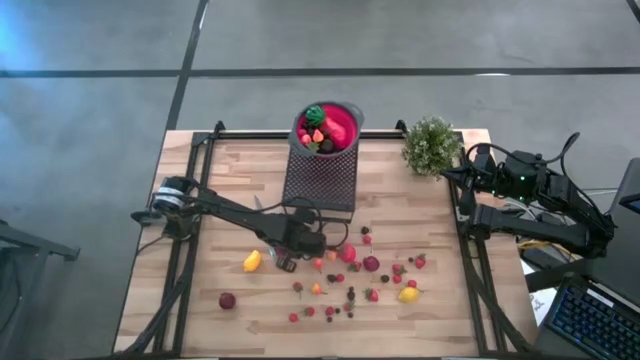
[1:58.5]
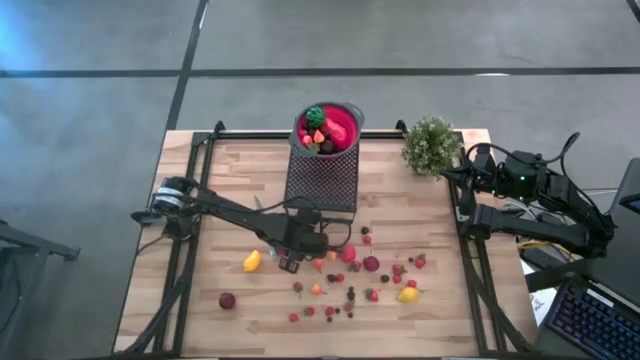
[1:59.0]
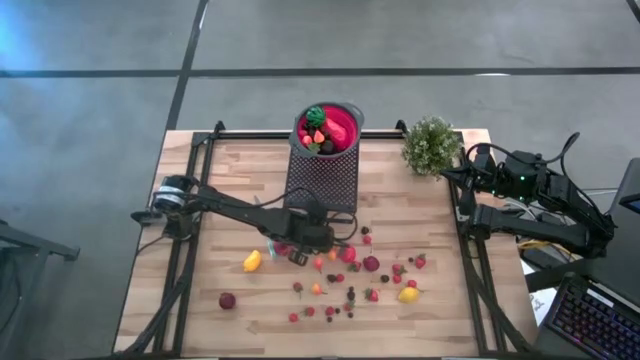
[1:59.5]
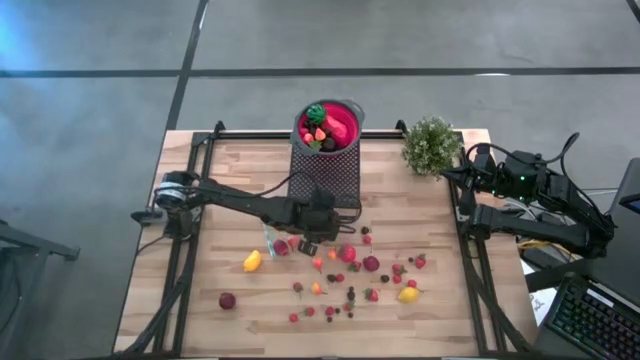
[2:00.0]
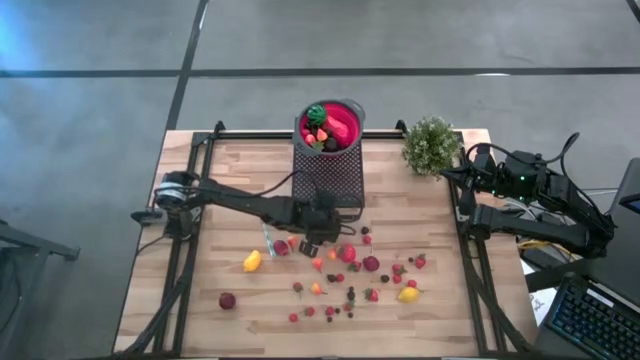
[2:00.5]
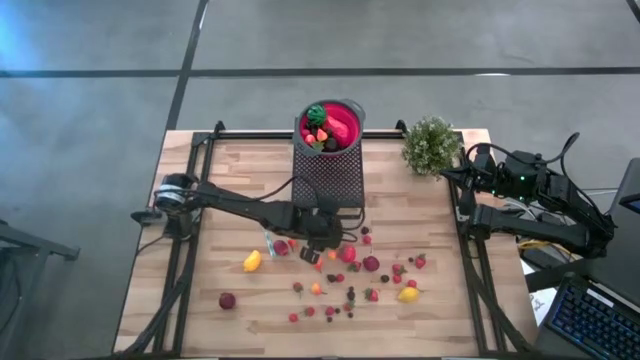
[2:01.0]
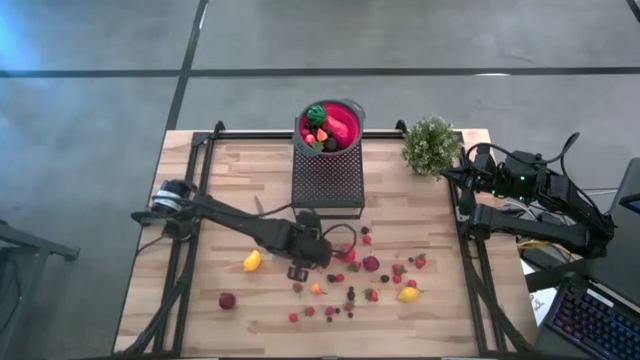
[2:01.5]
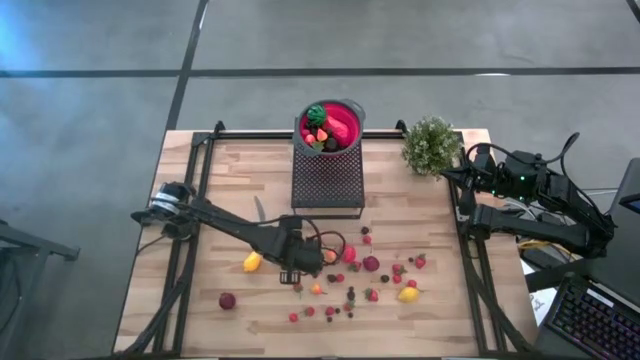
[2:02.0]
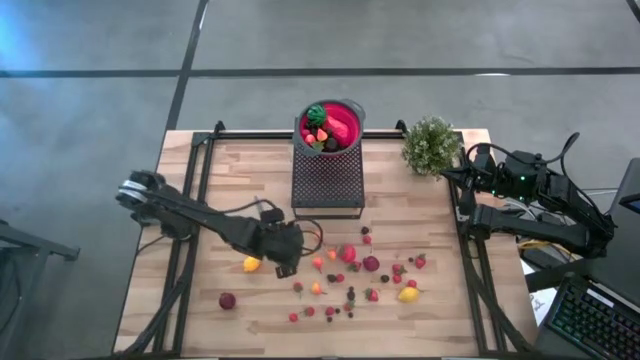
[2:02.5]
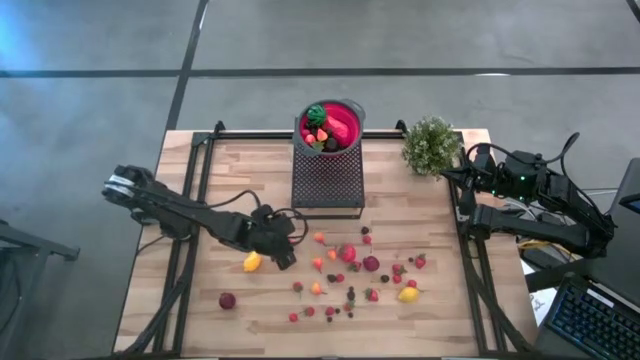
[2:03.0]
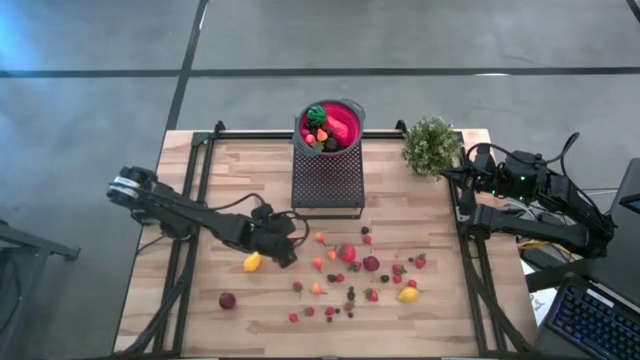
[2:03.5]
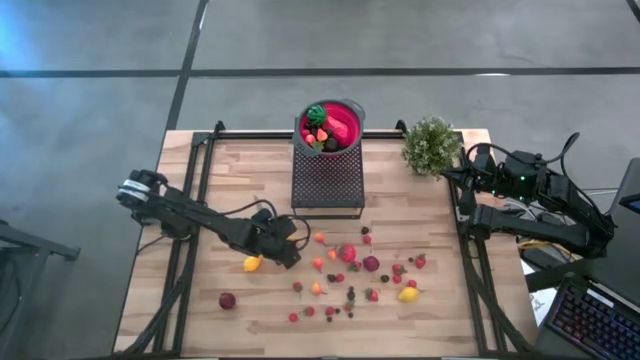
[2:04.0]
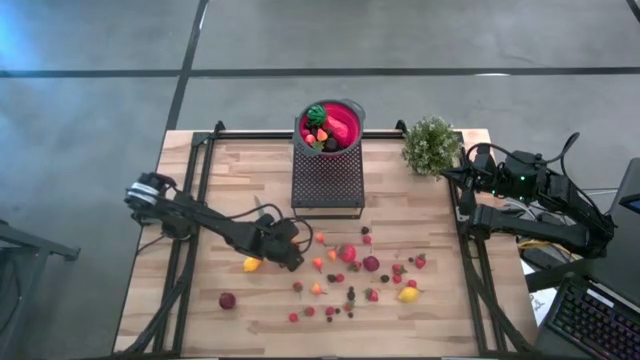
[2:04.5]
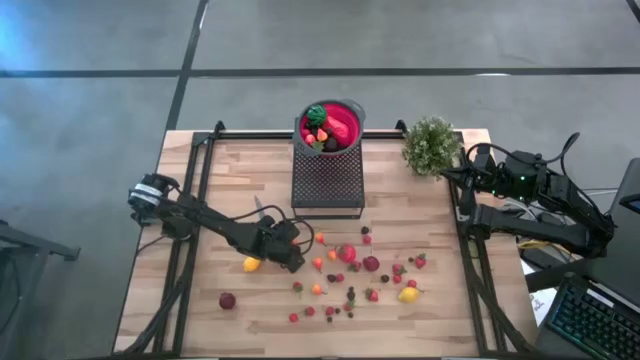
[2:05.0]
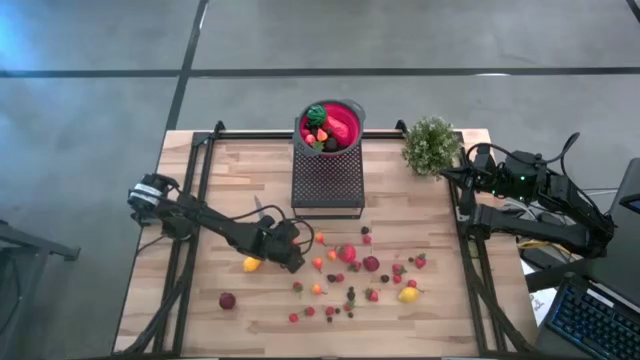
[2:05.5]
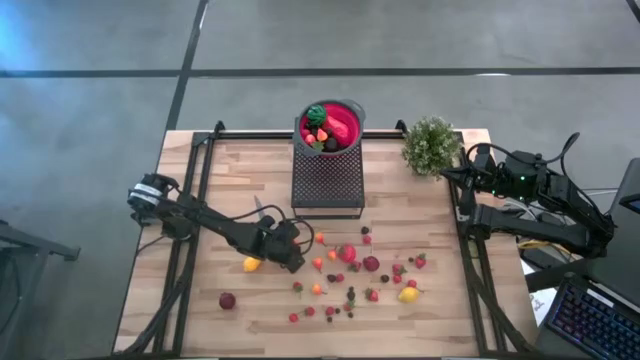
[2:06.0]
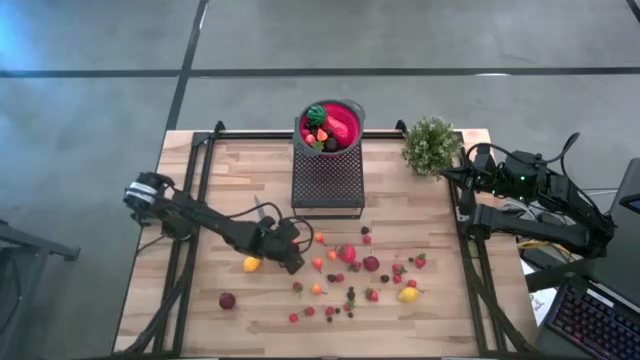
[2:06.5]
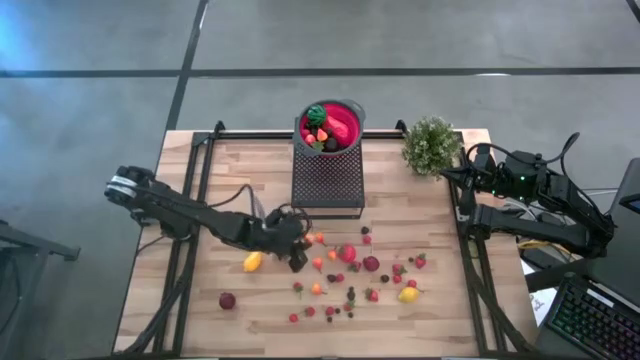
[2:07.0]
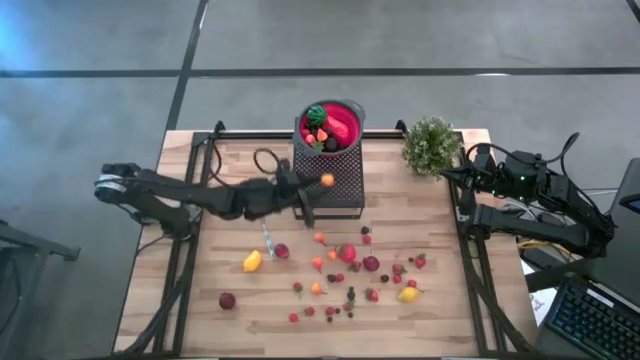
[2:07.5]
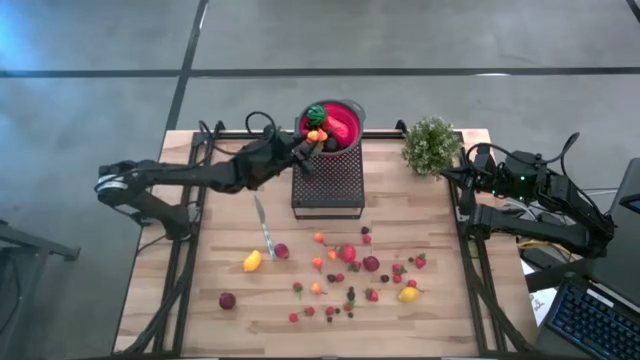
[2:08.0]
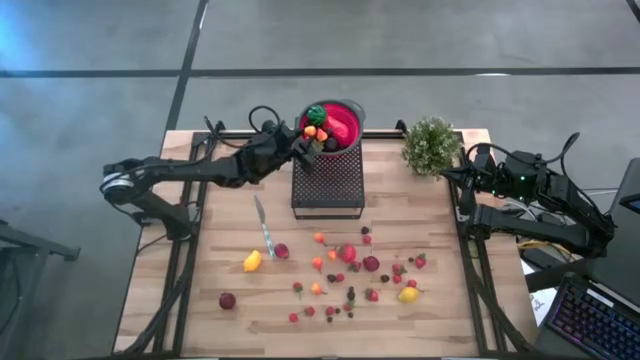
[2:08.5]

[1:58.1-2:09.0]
Task: Pick & Place Fruit
Put the pear into the strainer bowl on the shelf

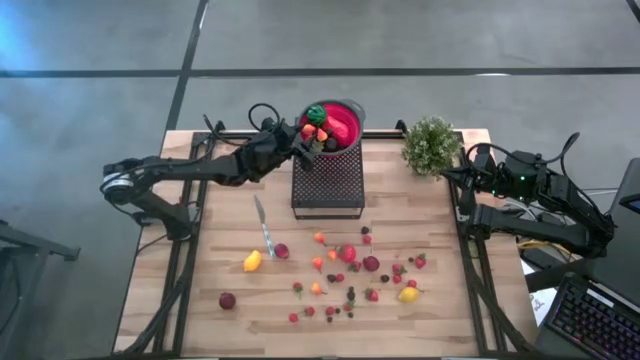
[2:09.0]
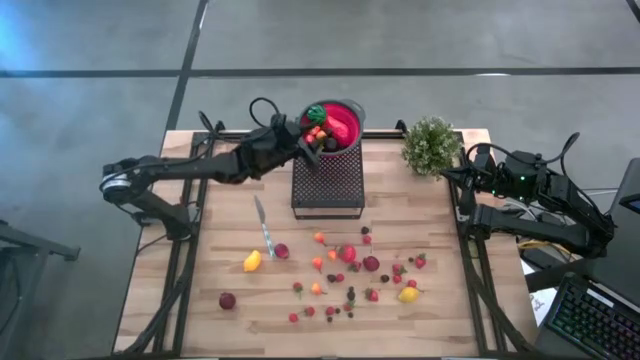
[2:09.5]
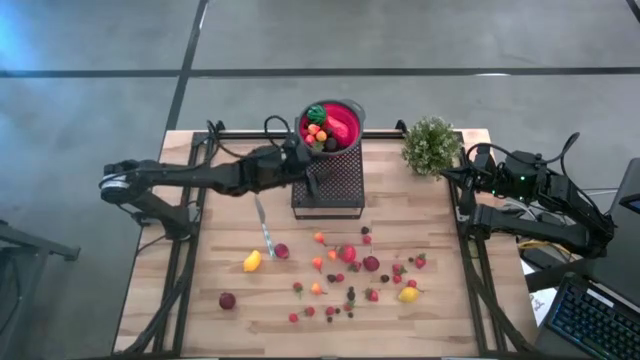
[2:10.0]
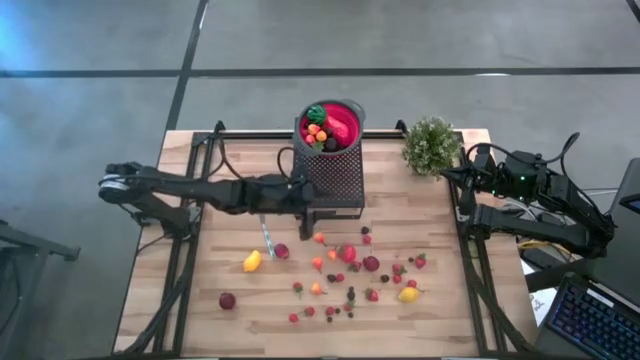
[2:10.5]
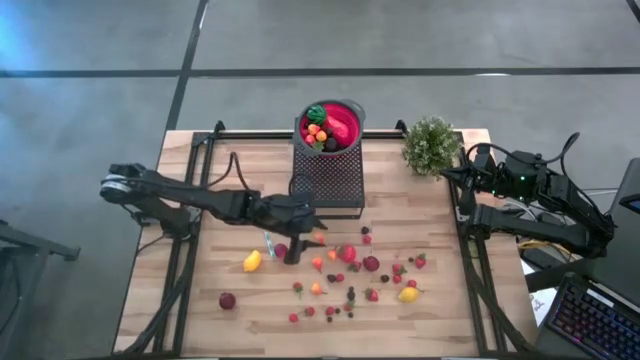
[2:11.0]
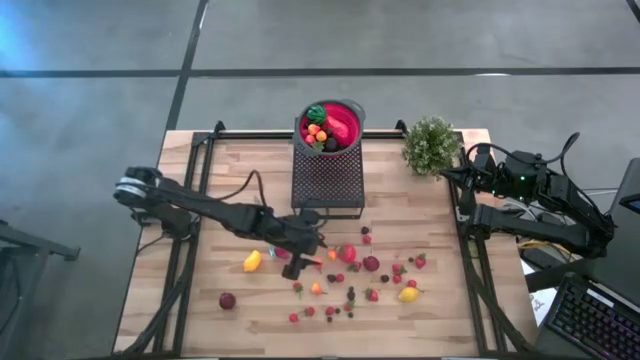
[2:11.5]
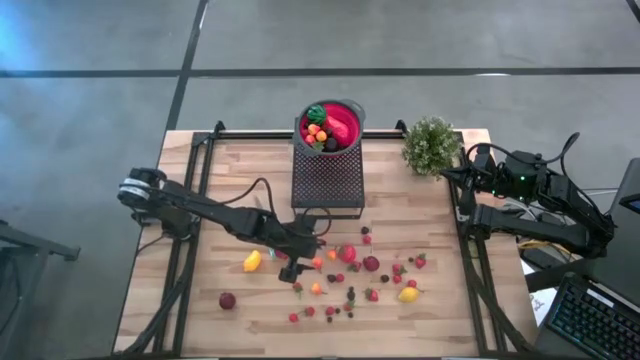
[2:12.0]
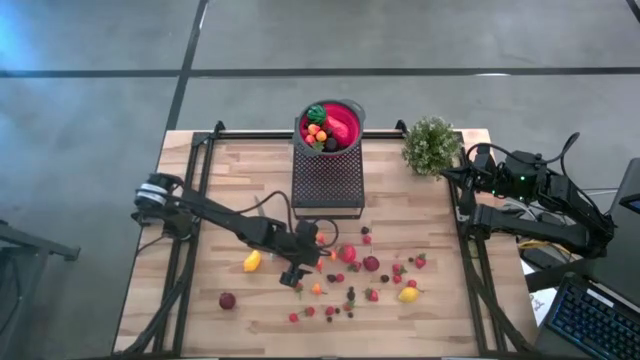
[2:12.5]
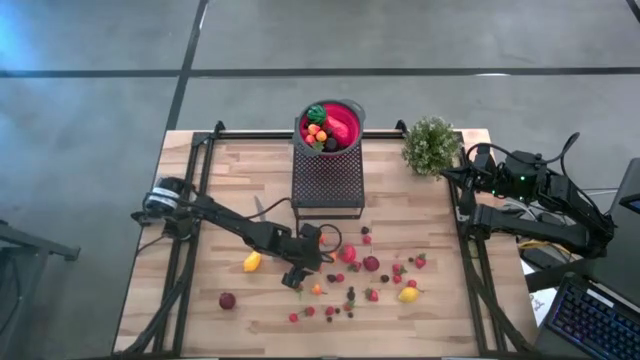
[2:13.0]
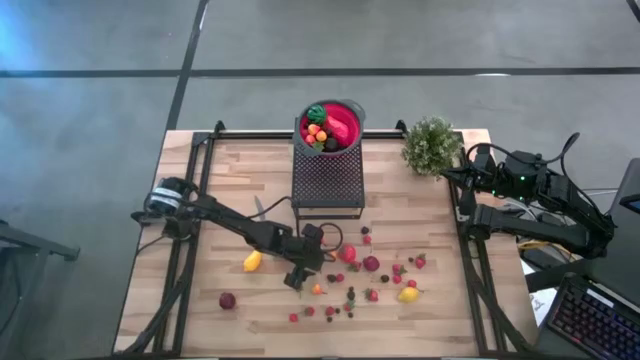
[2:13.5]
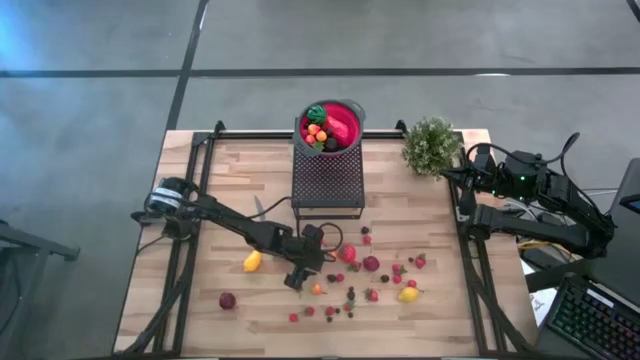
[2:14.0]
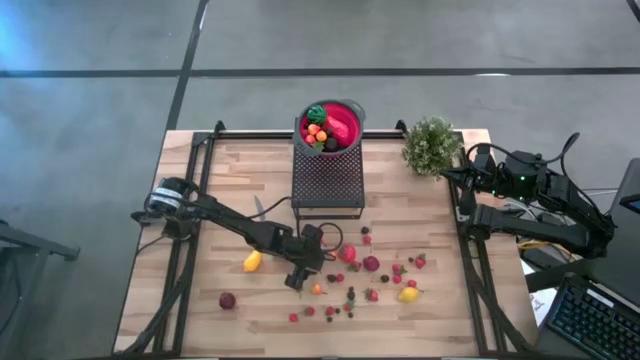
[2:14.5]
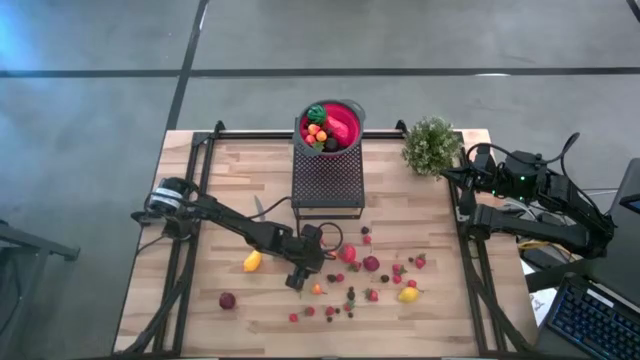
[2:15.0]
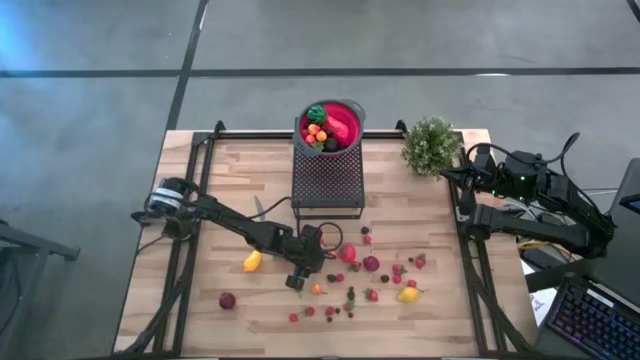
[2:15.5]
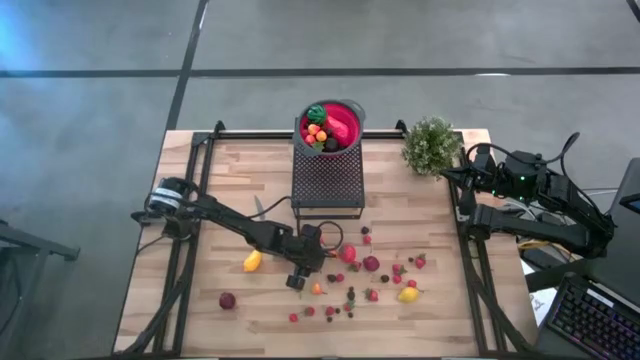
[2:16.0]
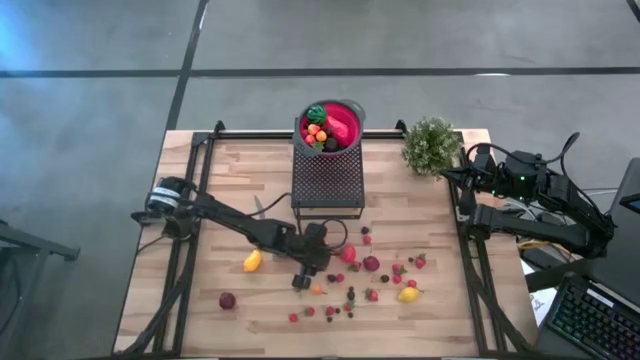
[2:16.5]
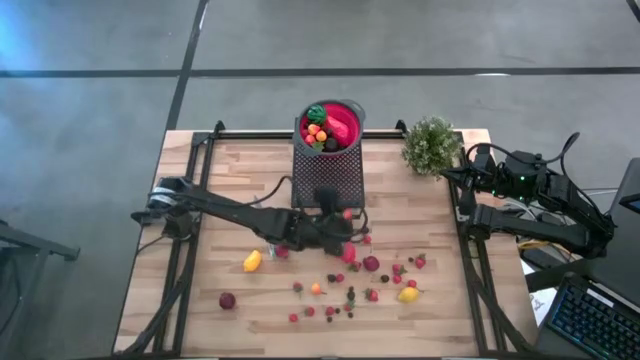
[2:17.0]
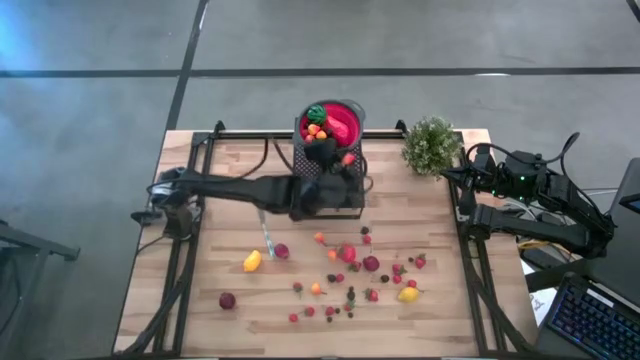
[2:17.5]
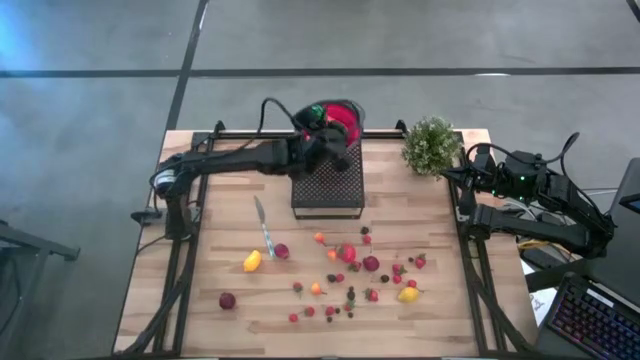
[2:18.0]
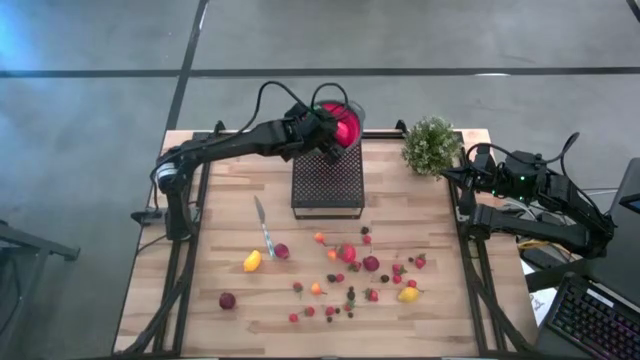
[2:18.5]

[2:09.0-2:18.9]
Put the pear into the strainer bowl on the shelf

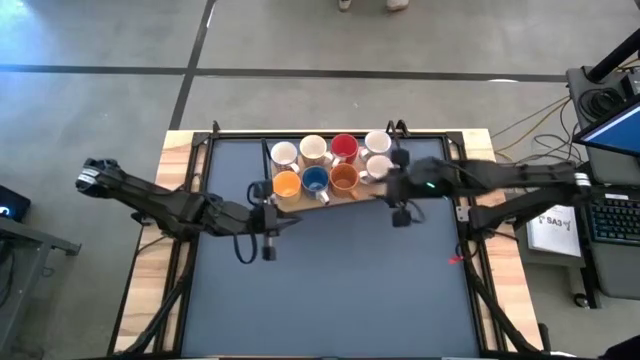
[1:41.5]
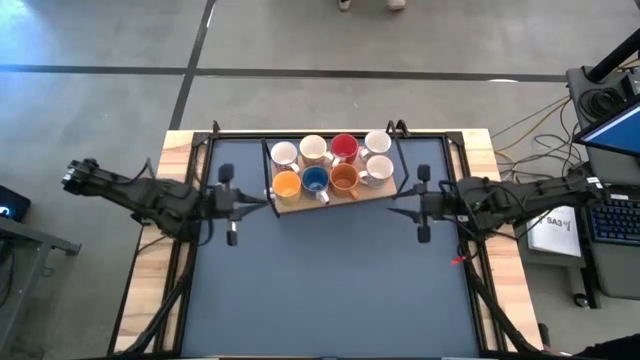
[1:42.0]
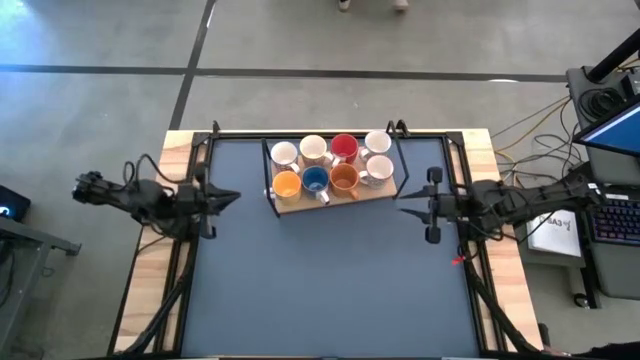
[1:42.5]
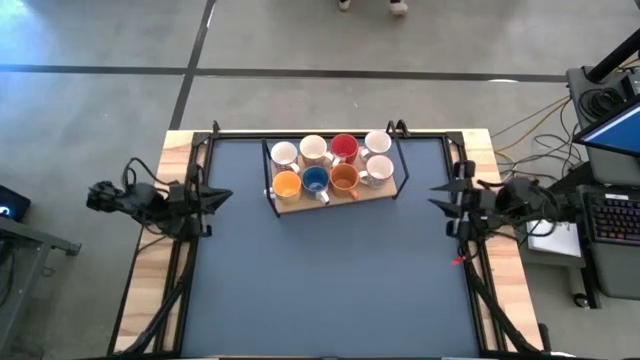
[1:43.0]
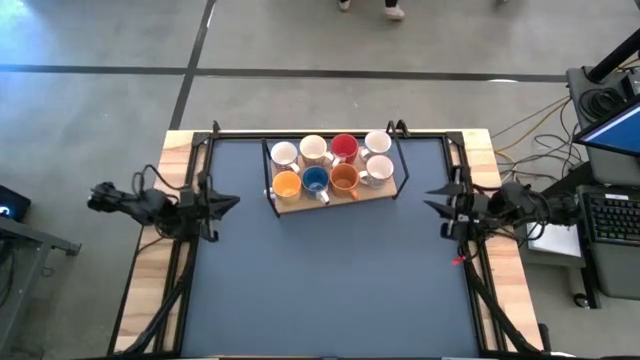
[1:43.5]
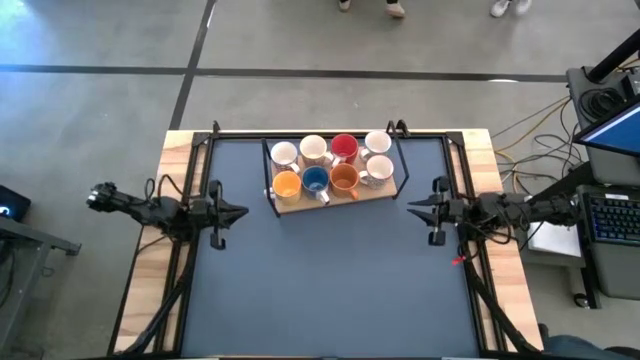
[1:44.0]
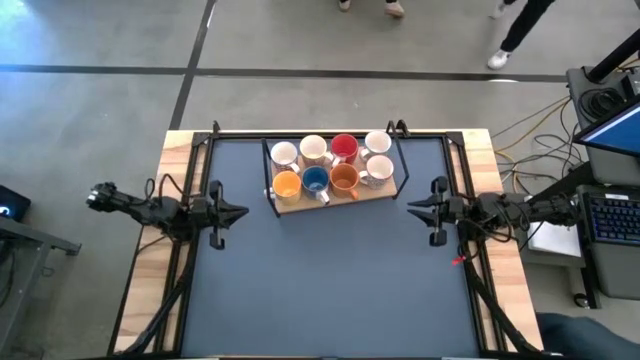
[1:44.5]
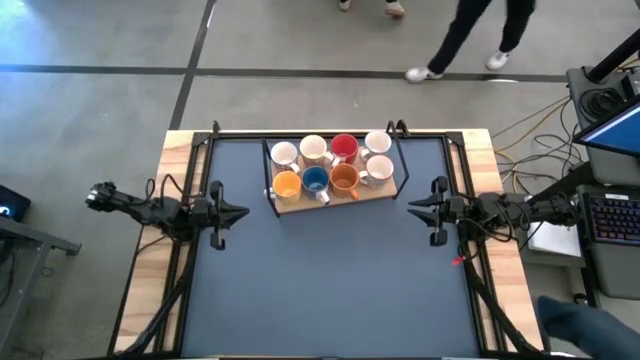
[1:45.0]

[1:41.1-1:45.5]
Task: Place coffee mugs
Return to Home Position
